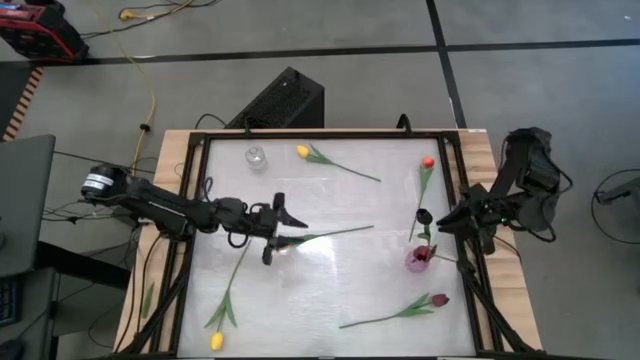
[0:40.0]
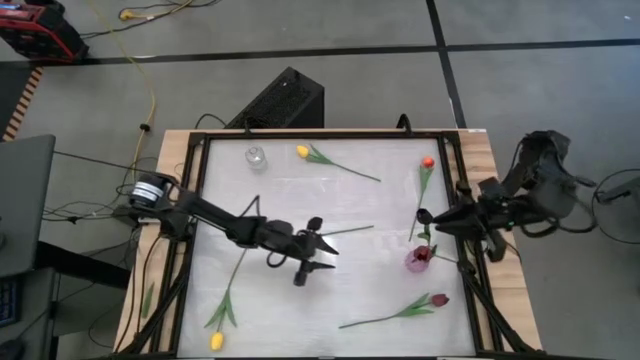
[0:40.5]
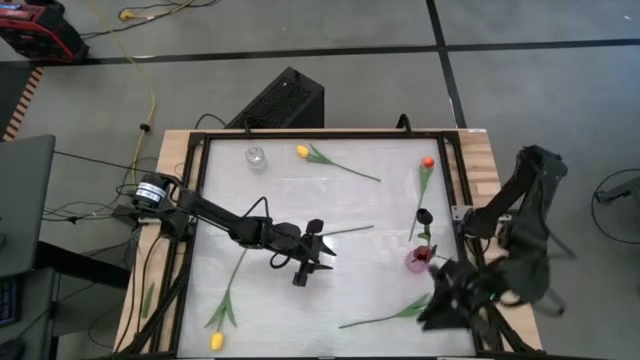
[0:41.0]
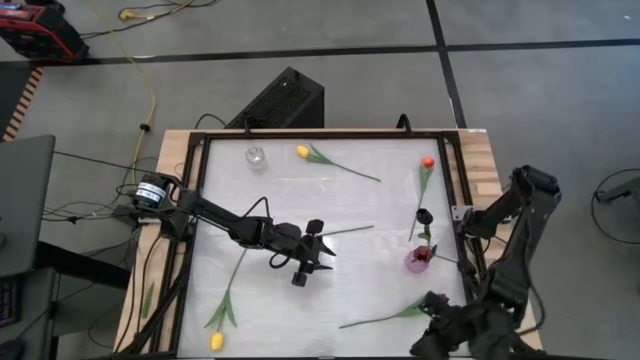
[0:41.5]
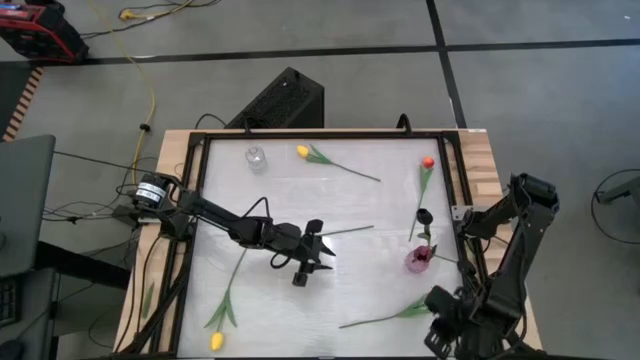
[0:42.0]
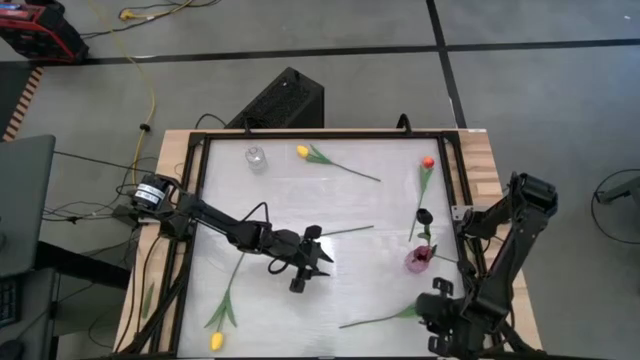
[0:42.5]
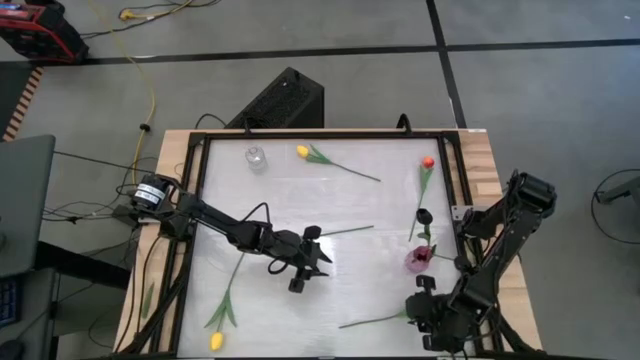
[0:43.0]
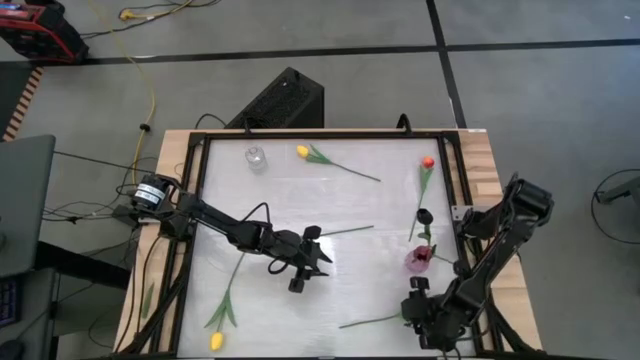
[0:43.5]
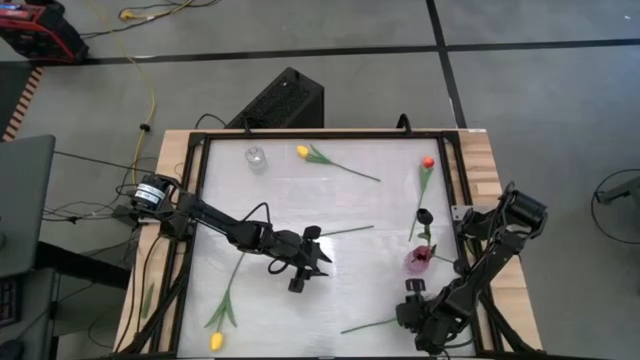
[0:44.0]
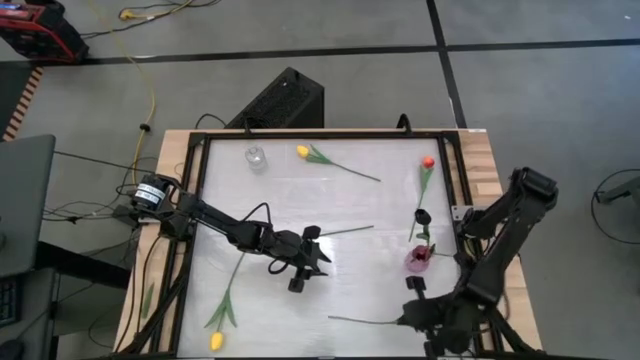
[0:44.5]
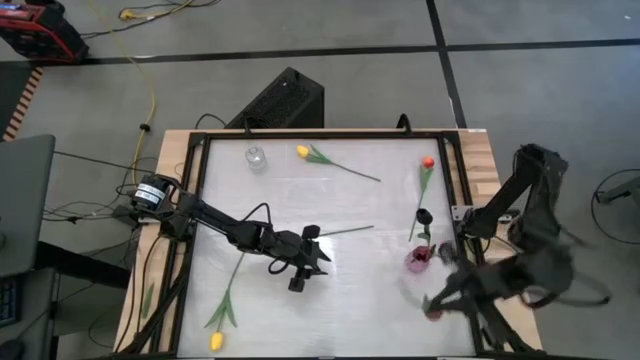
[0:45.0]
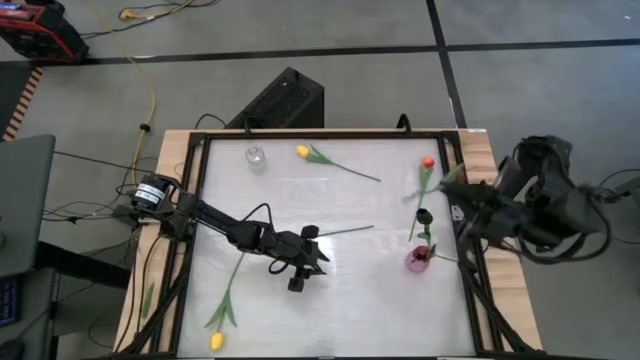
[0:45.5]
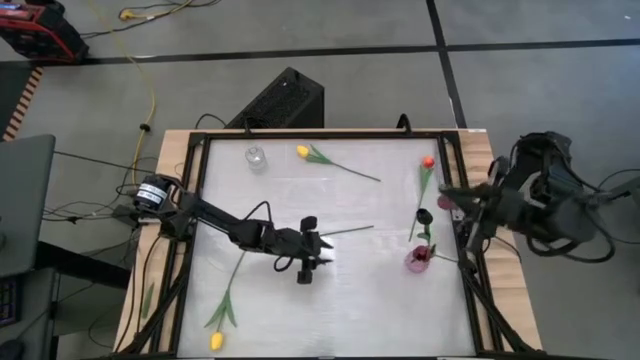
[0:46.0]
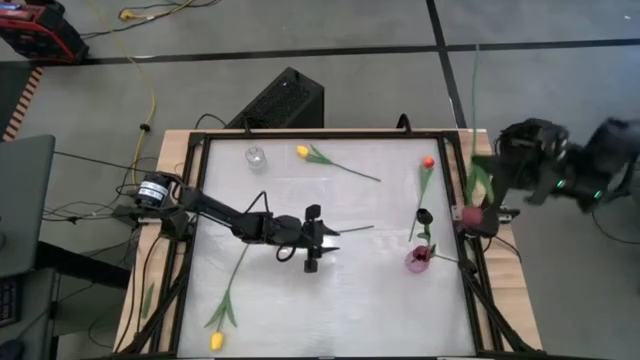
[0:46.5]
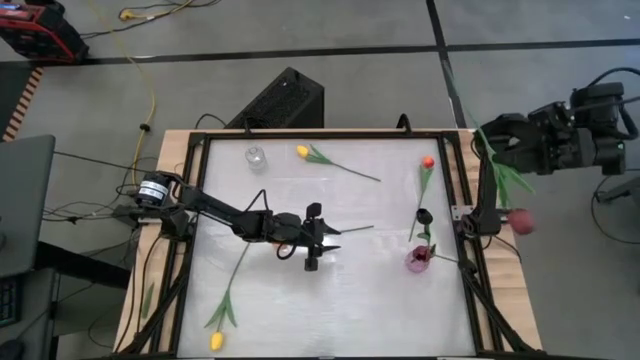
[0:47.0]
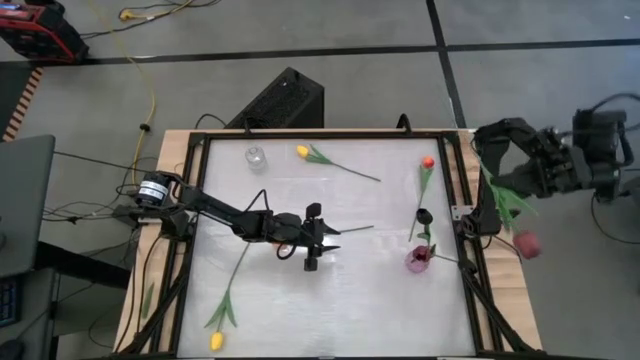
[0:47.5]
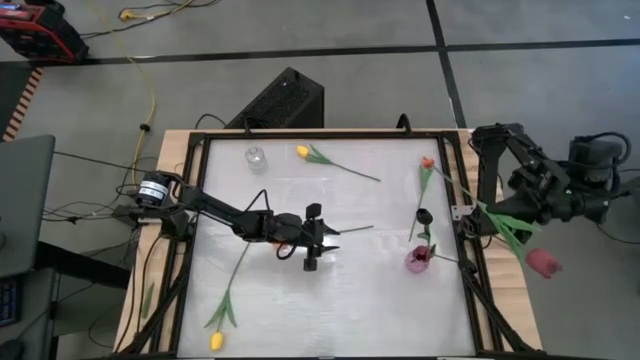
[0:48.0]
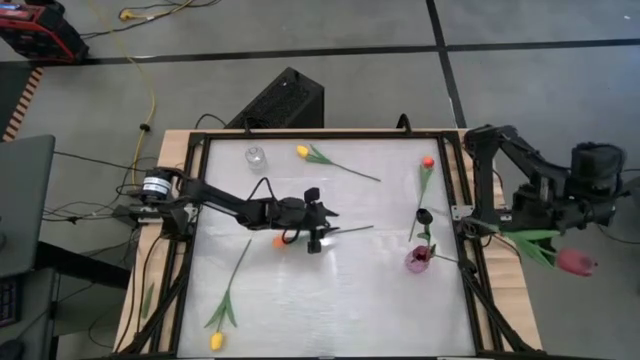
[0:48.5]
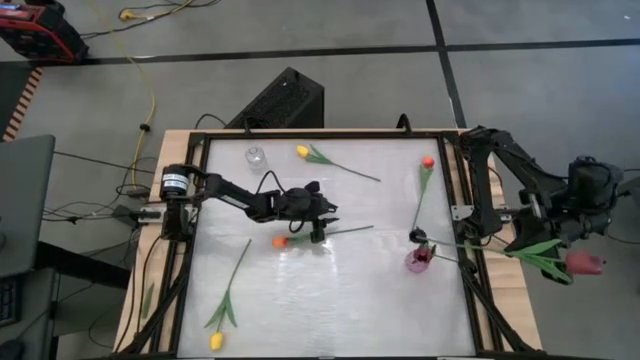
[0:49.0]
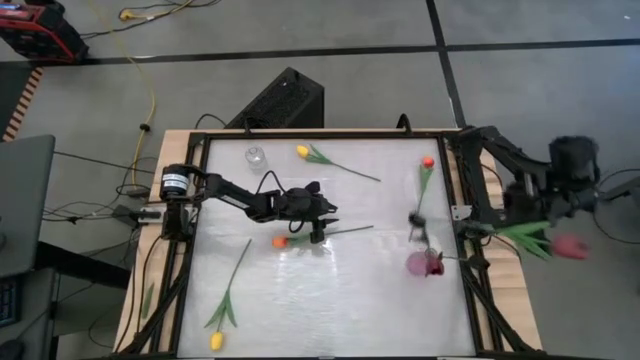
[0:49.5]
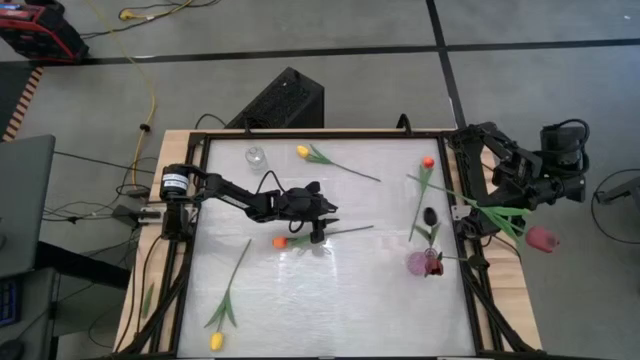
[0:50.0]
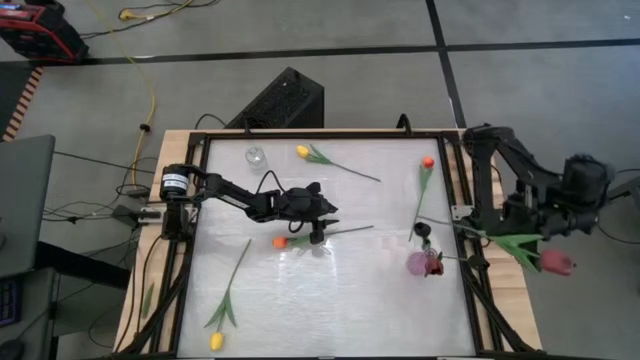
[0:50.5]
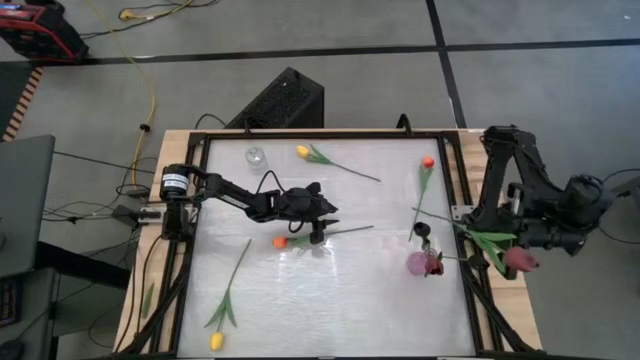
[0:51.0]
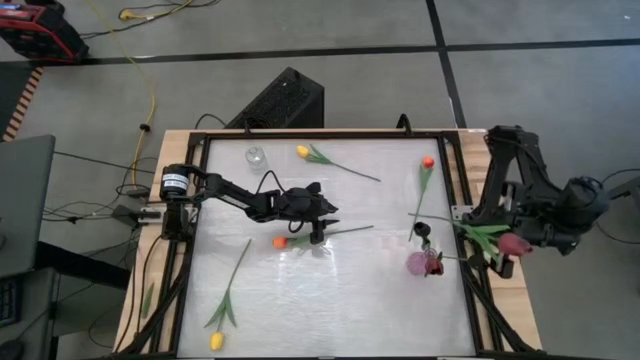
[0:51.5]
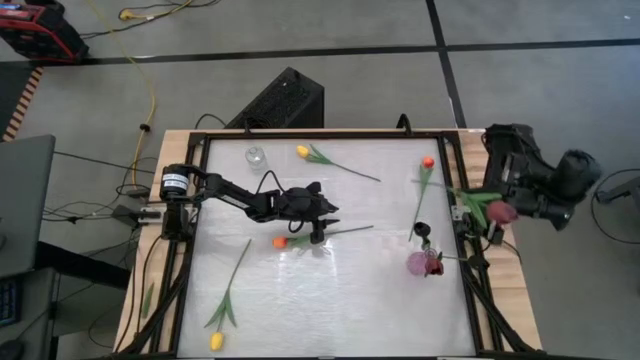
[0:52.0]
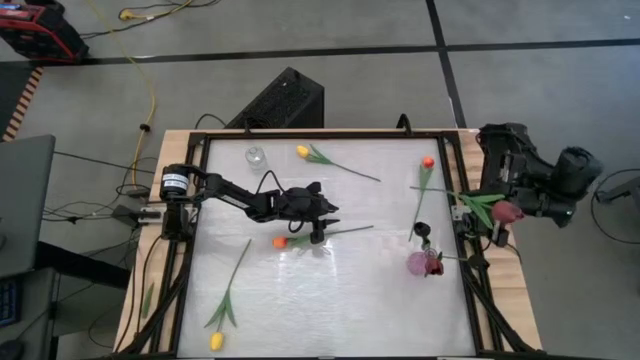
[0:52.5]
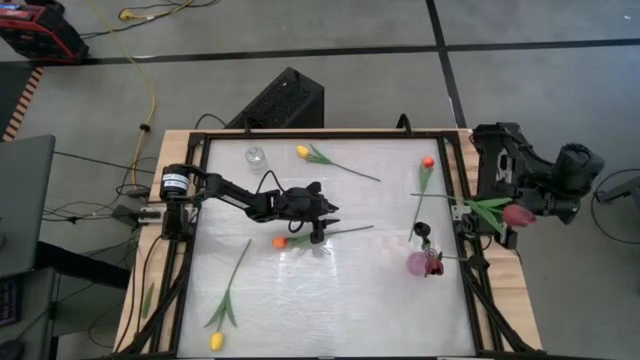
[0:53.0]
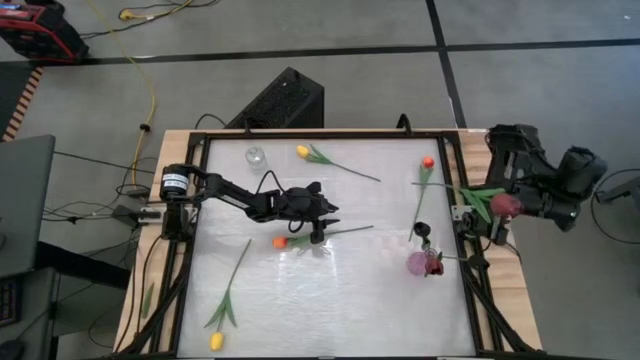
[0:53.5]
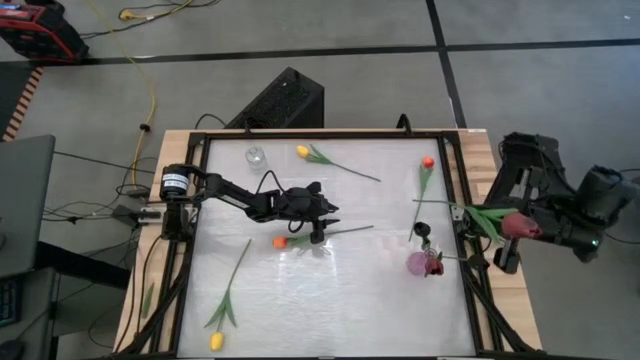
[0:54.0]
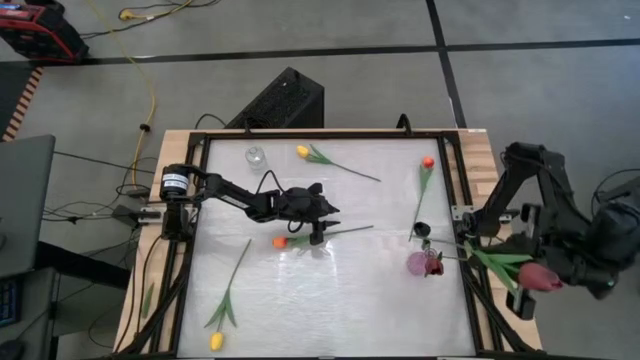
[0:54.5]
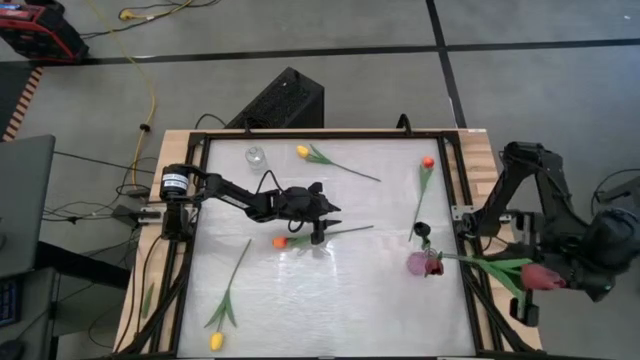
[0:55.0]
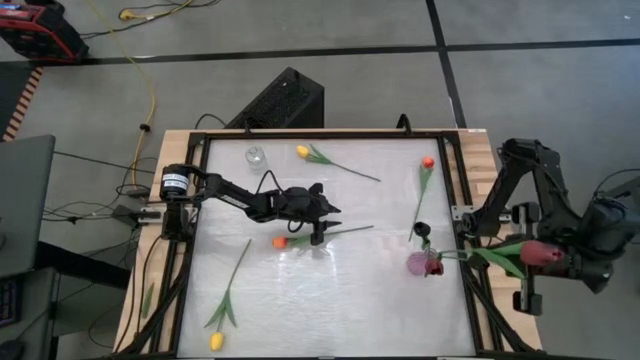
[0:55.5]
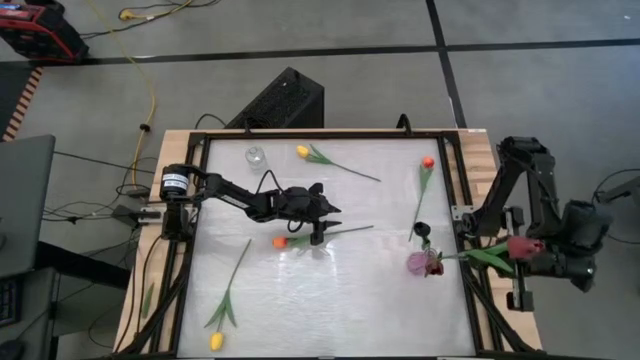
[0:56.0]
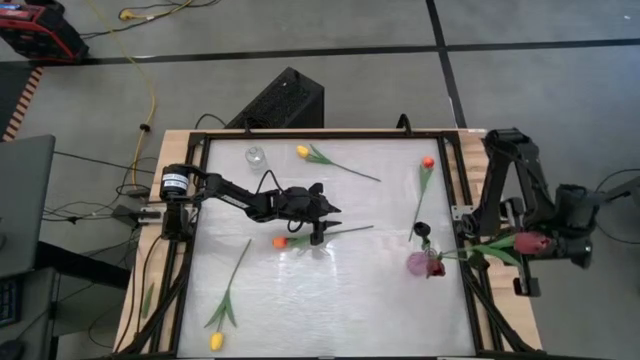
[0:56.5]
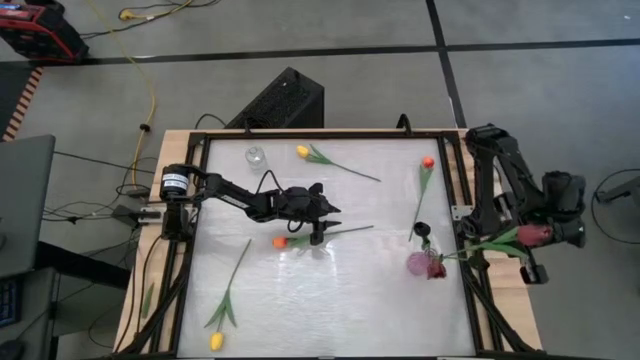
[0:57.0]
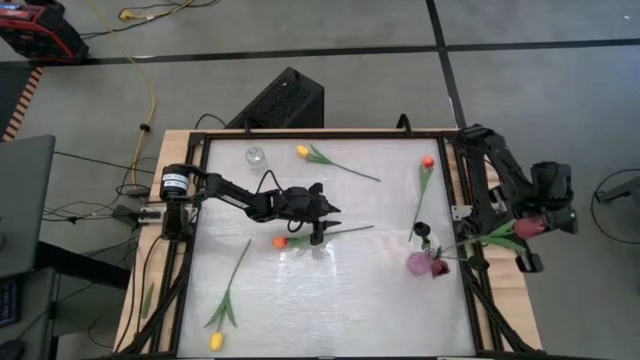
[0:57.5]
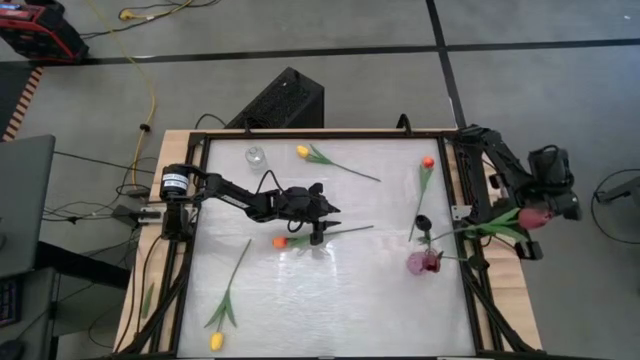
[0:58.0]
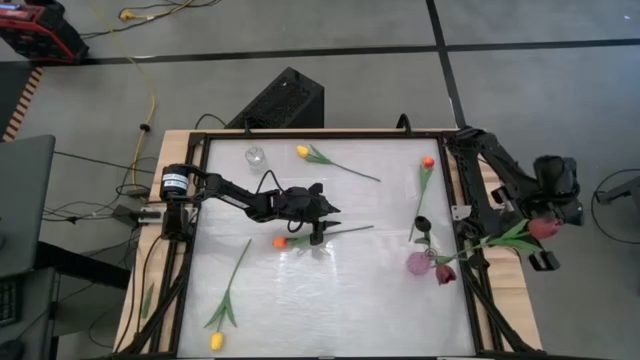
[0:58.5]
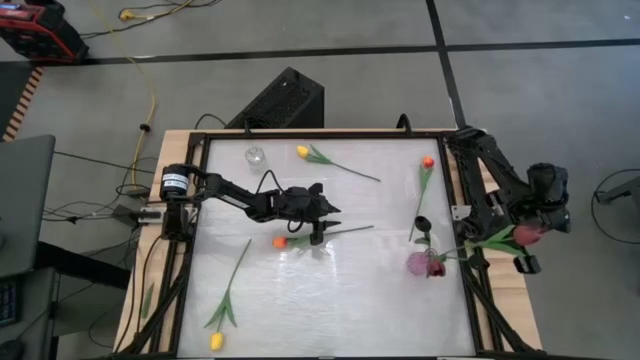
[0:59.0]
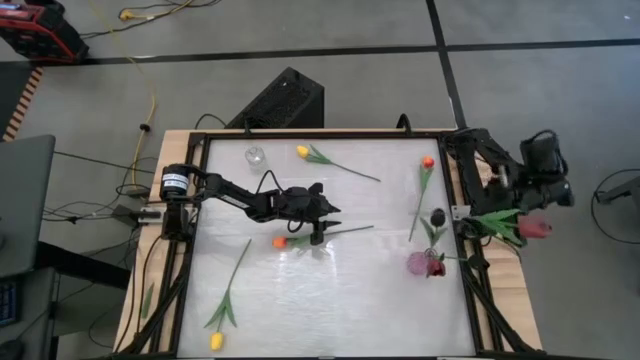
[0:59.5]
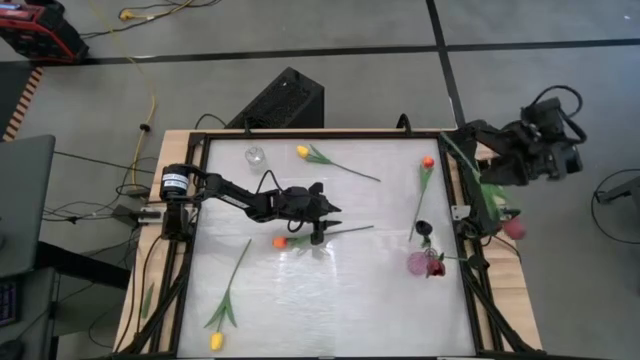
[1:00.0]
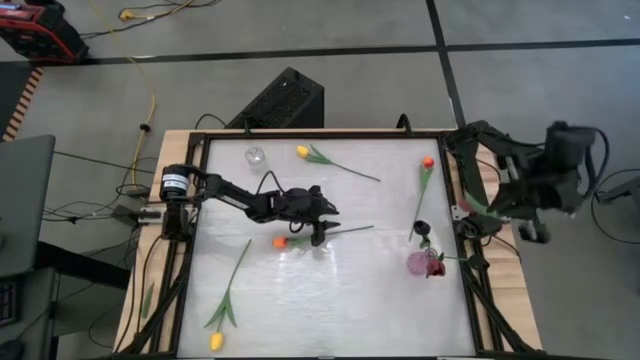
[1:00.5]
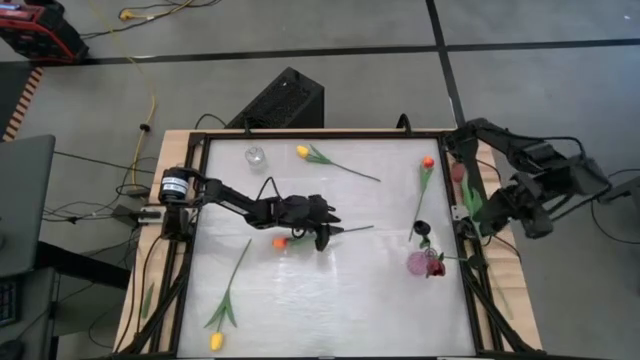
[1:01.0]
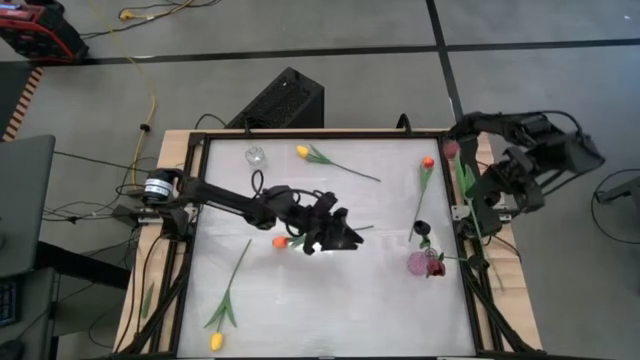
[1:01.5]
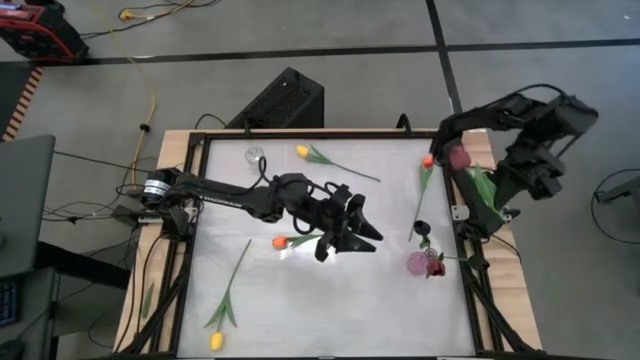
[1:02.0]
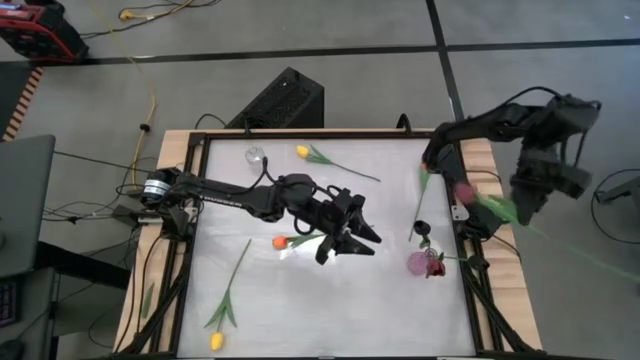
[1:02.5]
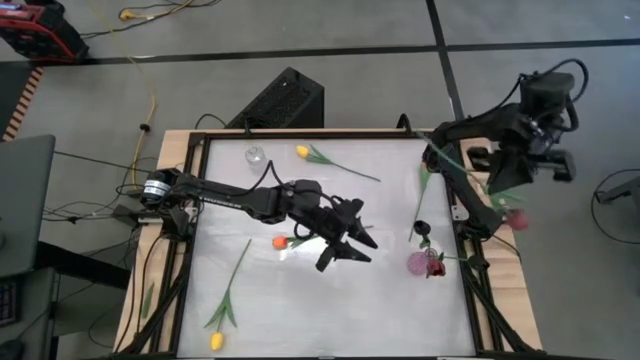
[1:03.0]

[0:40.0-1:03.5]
Task: Sort flowers into vase by color
Put the dark red flower into the pink vase
